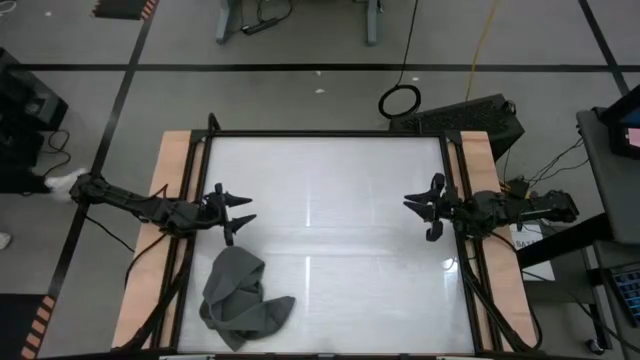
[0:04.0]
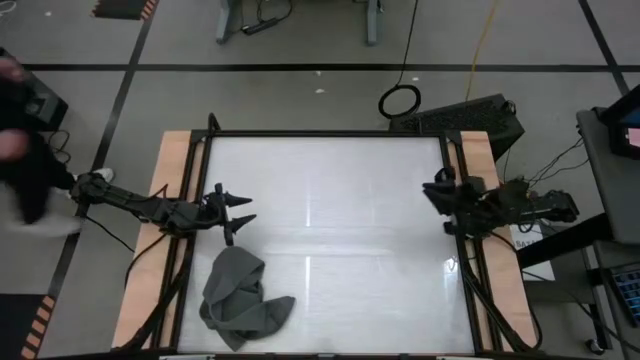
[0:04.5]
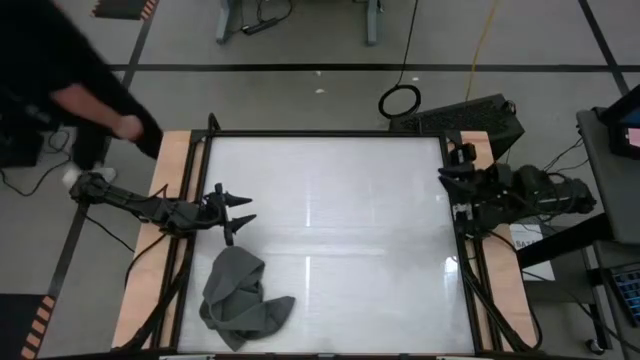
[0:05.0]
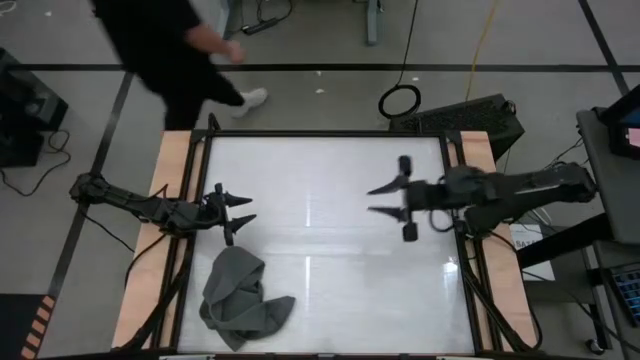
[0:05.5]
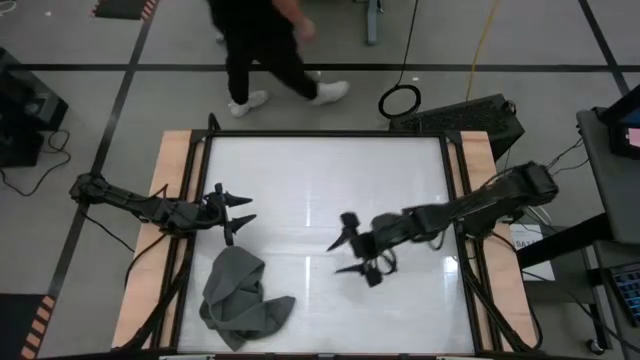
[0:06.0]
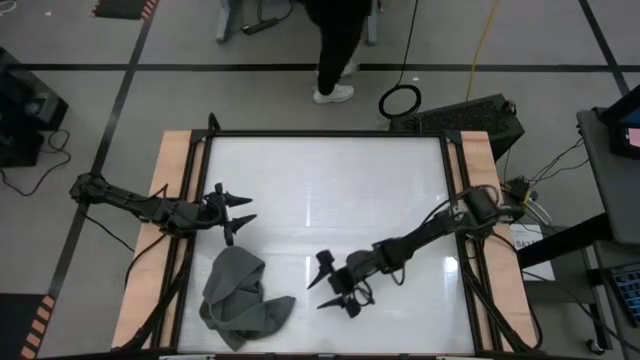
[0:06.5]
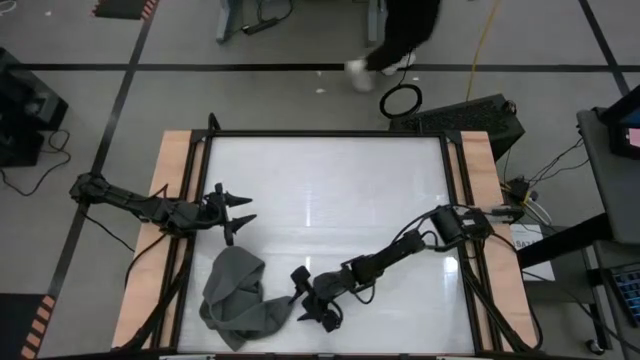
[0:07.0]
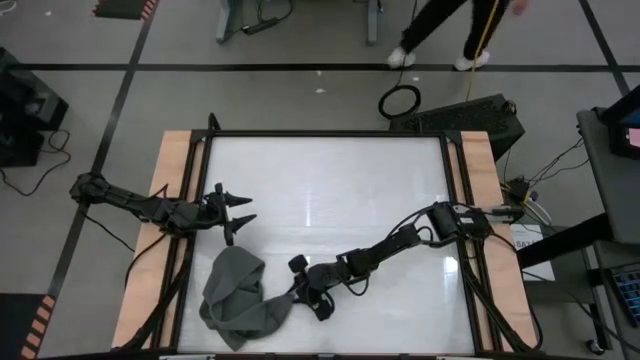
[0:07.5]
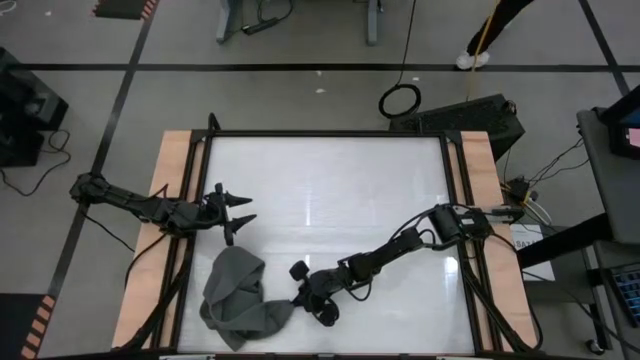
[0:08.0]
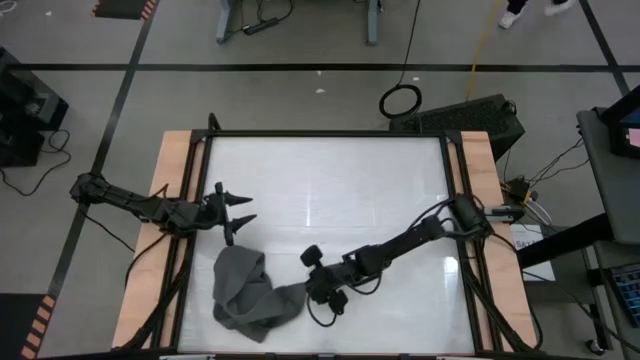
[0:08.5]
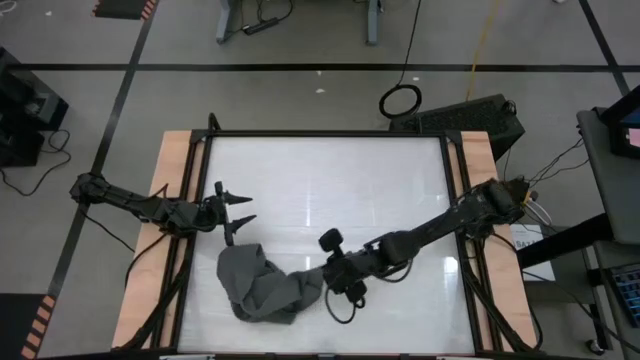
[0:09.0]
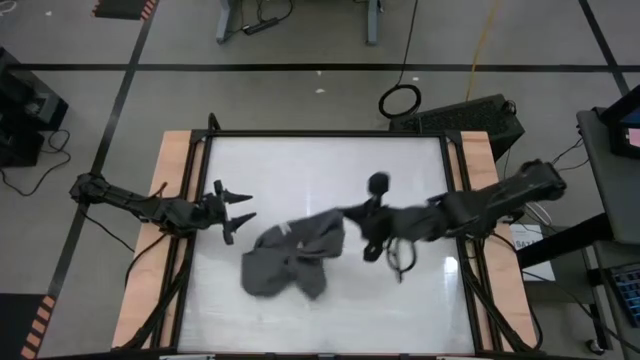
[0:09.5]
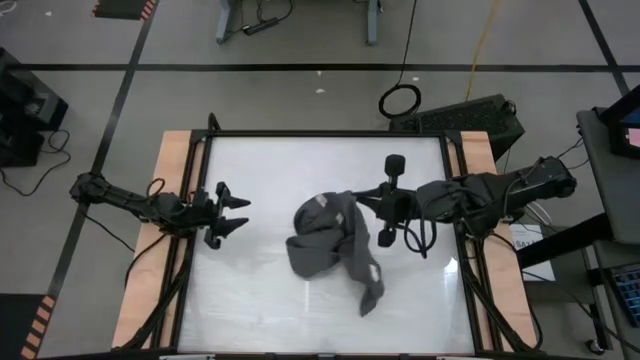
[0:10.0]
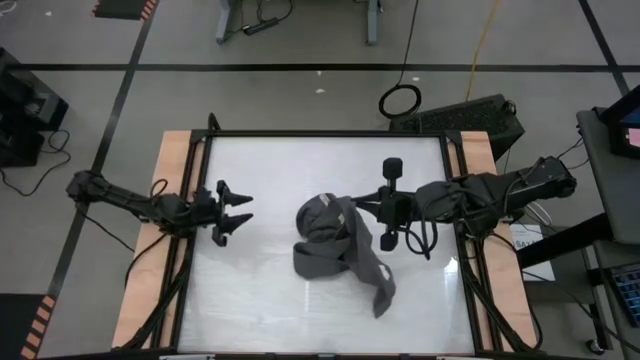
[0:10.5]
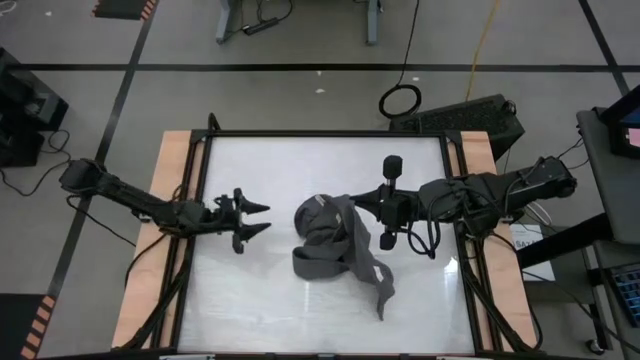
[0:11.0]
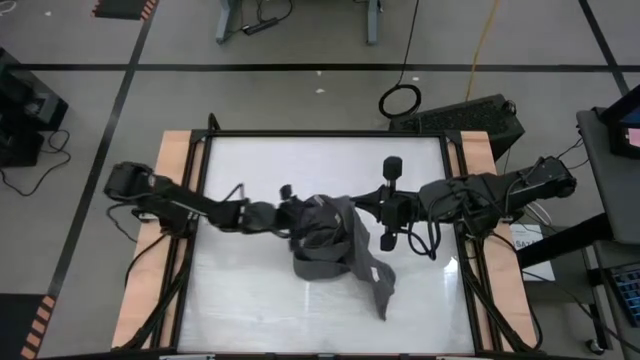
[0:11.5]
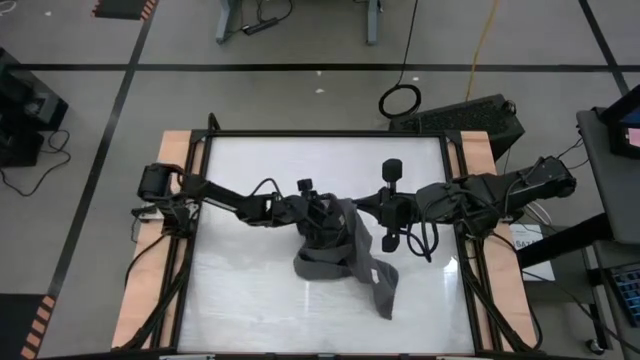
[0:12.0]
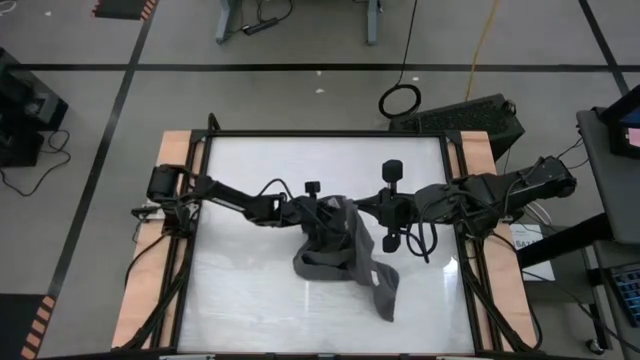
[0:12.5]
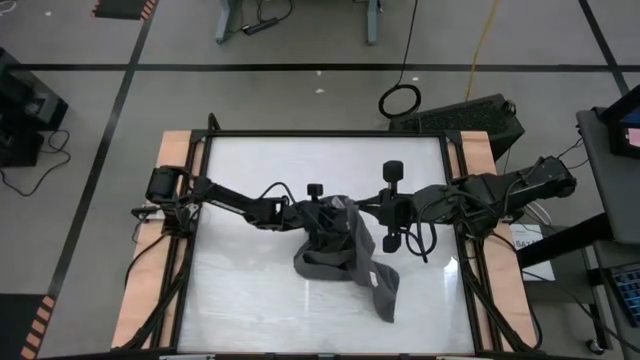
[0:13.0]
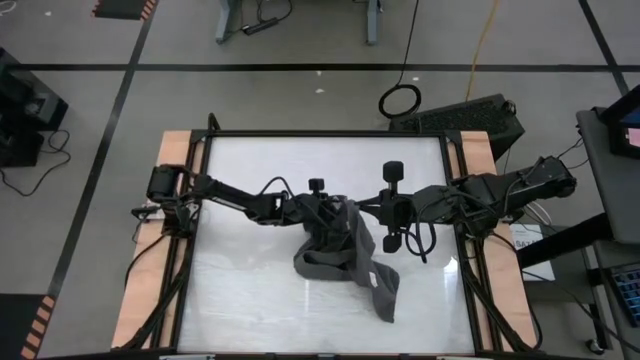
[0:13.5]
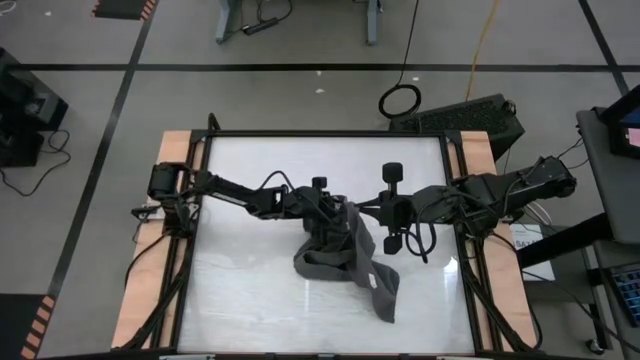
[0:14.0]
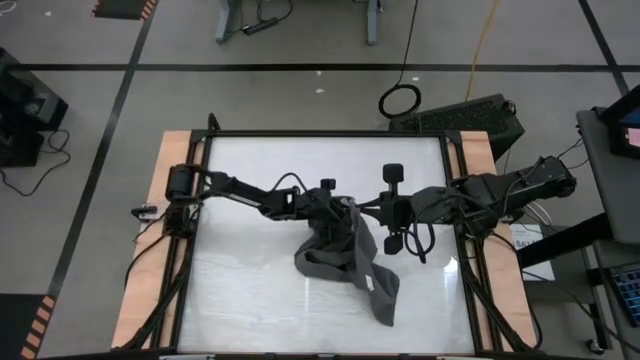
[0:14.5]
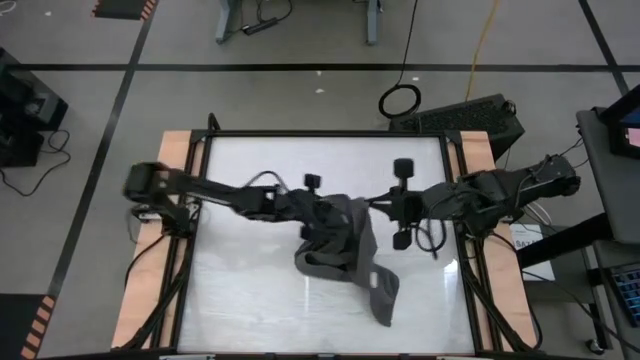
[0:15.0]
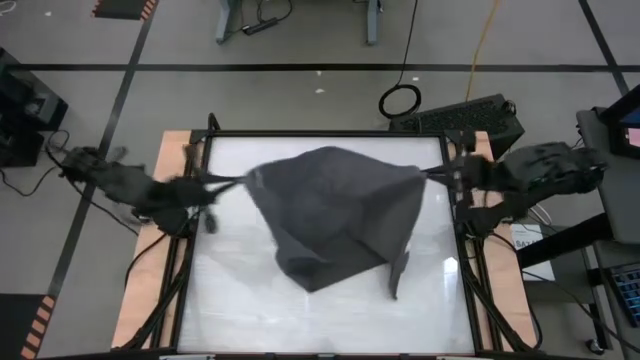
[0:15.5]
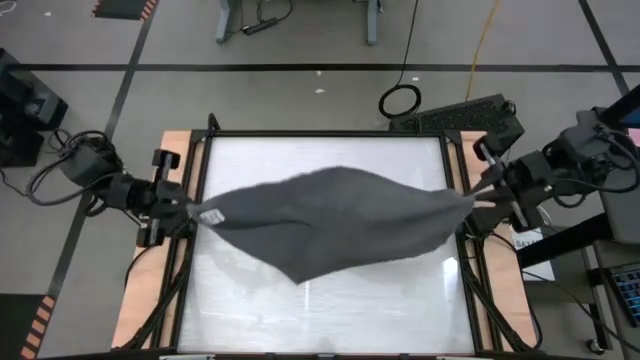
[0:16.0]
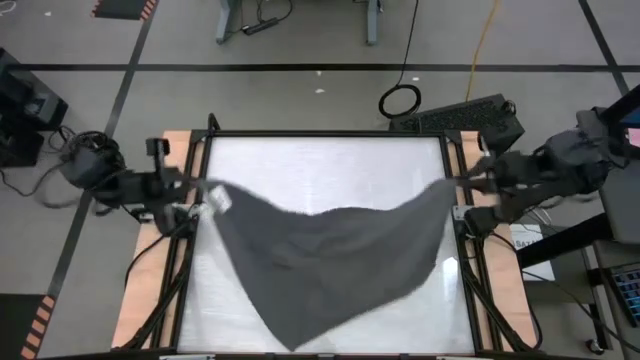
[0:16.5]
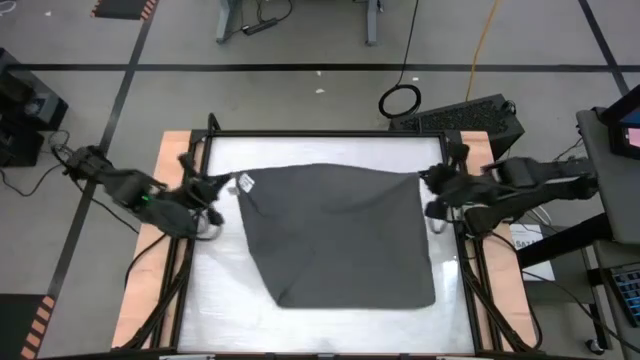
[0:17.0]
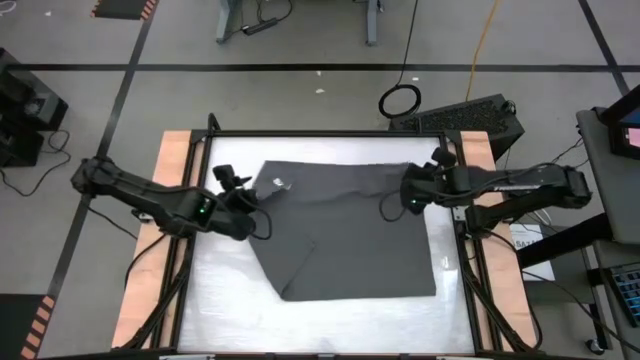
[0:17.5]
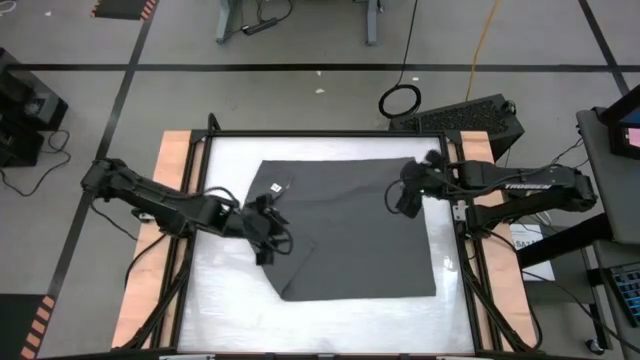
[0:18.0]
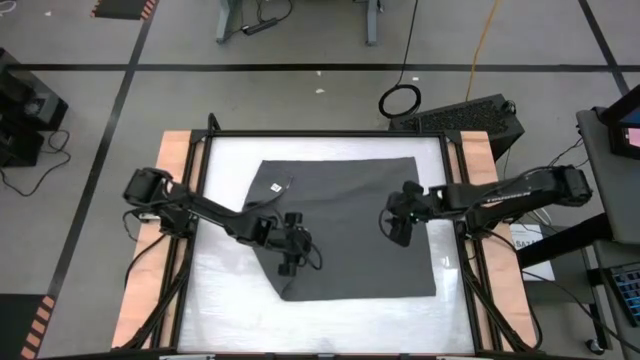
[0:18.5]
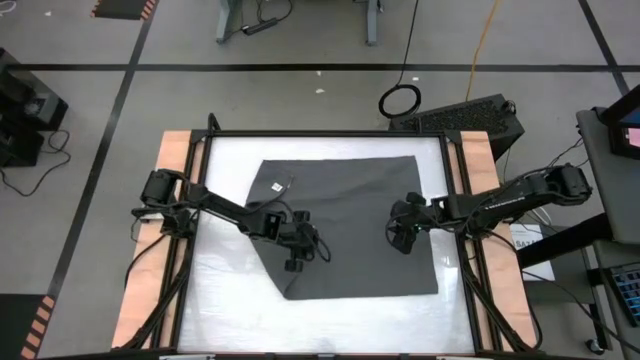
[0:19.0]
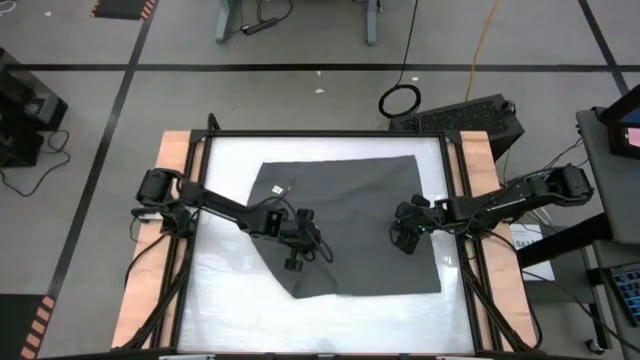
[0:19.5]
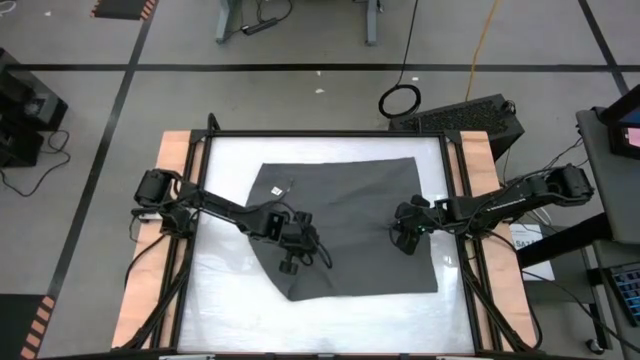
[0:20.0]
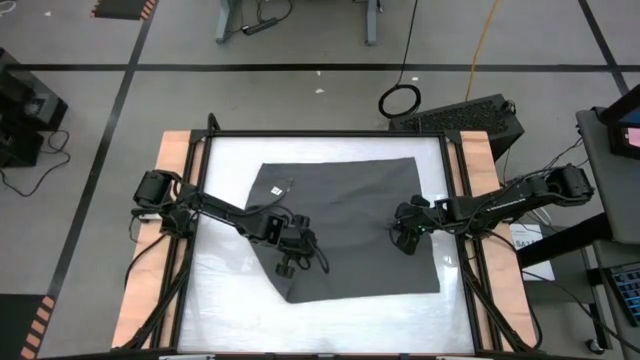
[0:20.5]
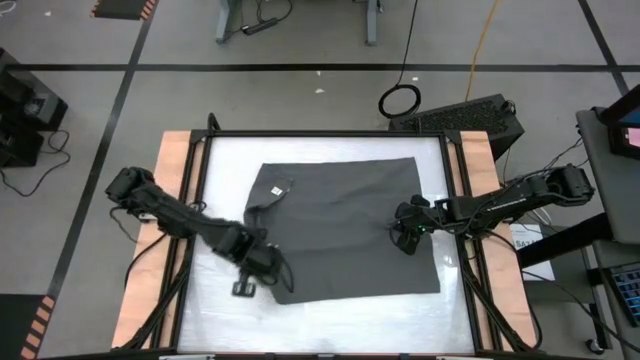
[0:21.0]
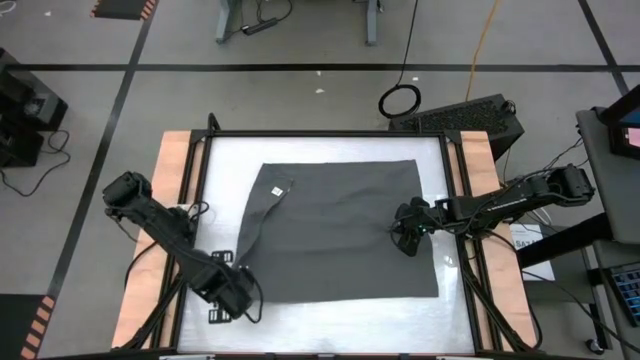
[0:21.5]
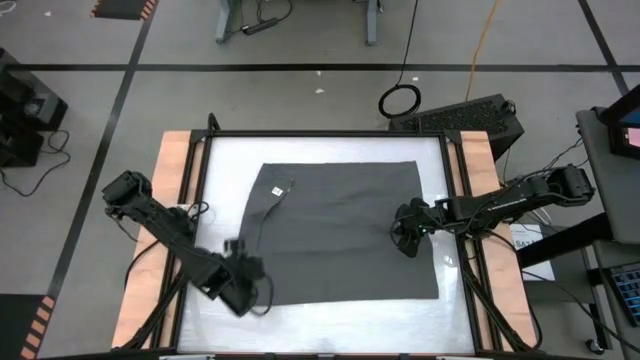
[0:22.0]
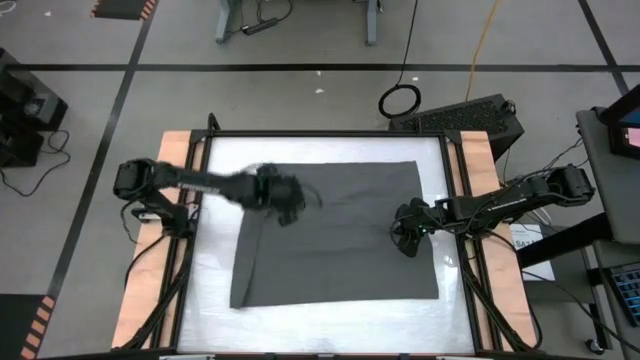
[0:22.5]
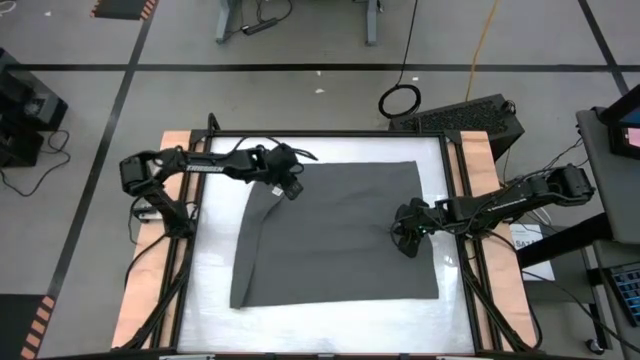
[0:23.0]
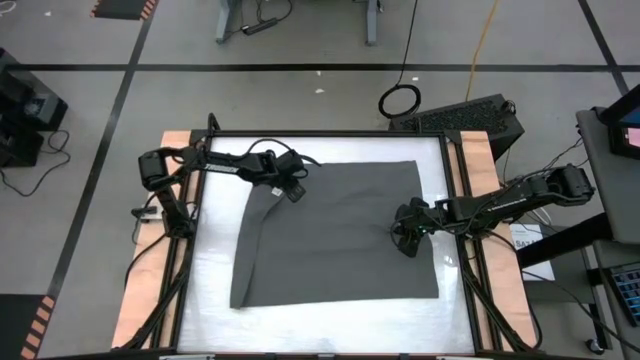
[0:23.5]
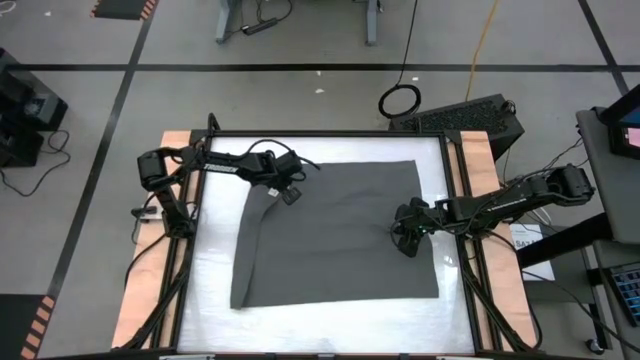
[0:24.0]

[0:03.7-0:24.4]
Task: Roll towel
Fold the dark gray towel
